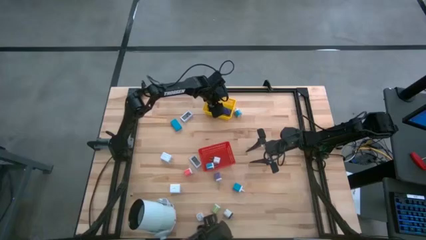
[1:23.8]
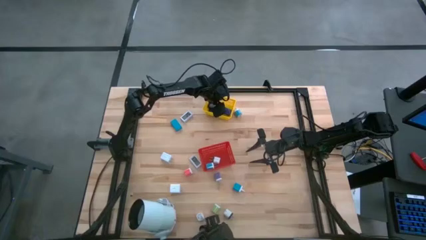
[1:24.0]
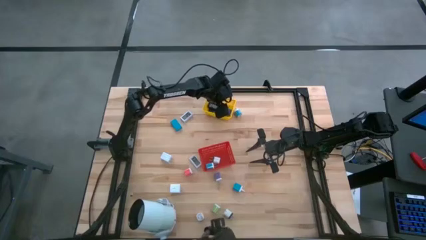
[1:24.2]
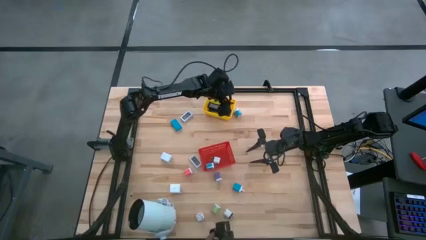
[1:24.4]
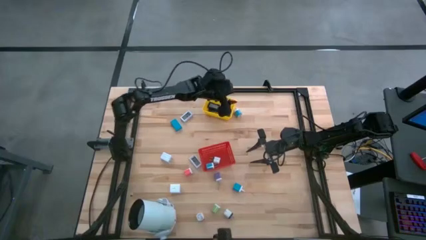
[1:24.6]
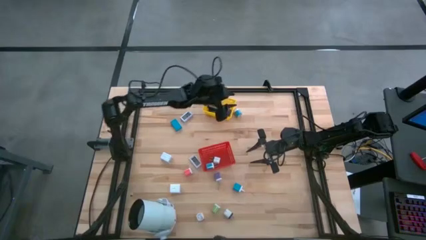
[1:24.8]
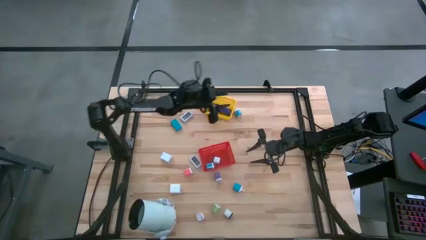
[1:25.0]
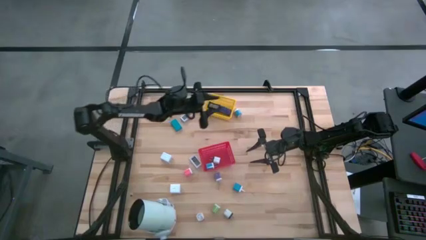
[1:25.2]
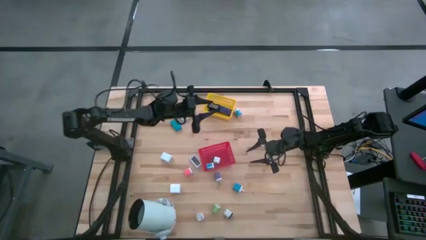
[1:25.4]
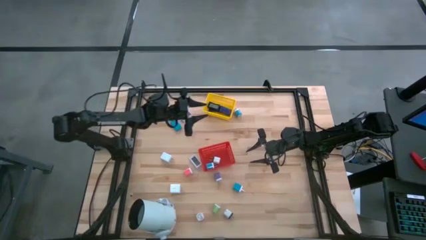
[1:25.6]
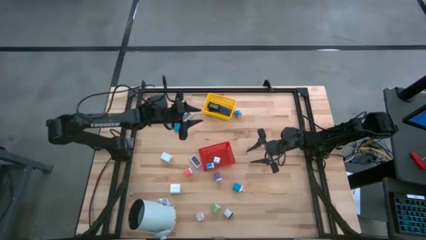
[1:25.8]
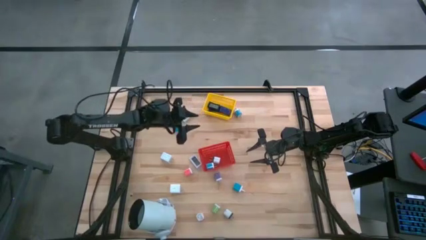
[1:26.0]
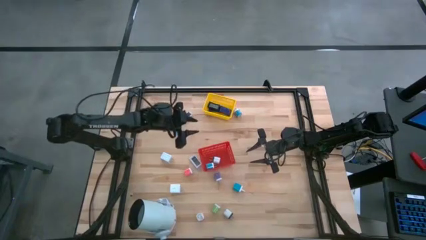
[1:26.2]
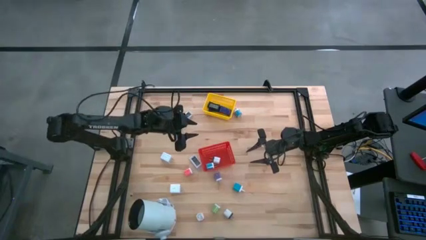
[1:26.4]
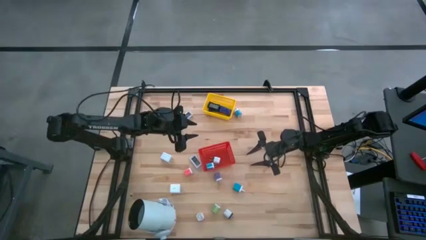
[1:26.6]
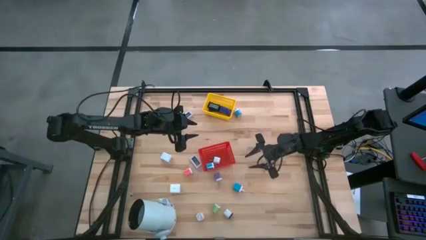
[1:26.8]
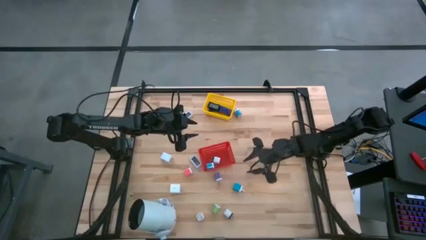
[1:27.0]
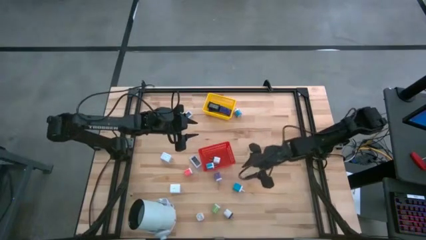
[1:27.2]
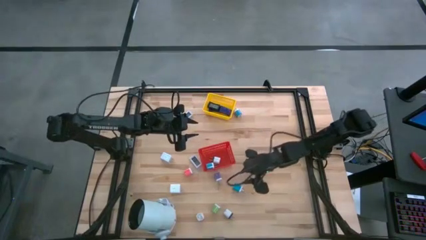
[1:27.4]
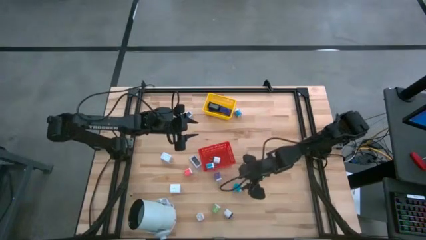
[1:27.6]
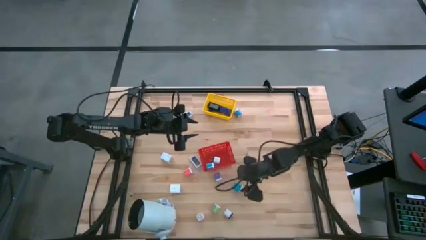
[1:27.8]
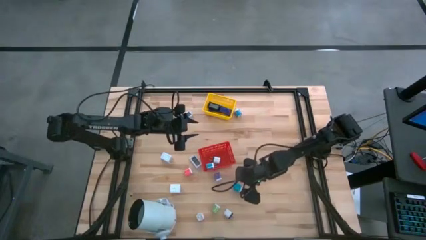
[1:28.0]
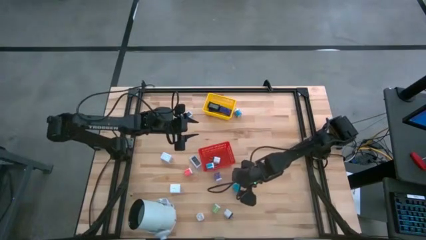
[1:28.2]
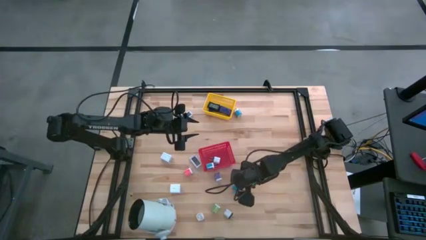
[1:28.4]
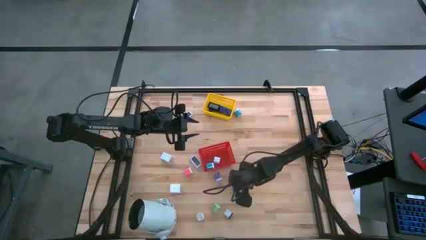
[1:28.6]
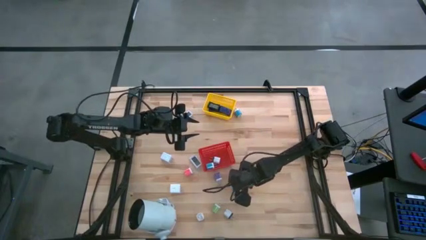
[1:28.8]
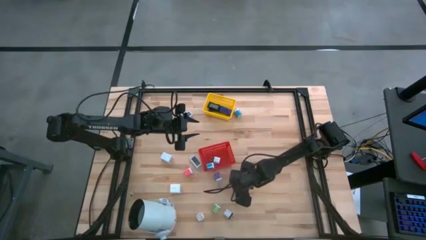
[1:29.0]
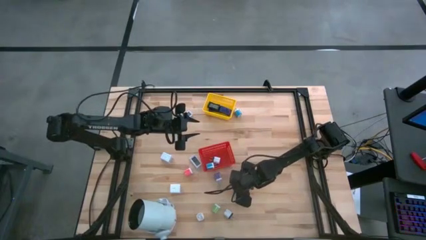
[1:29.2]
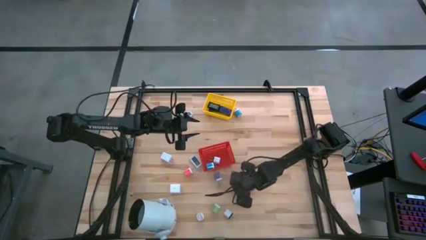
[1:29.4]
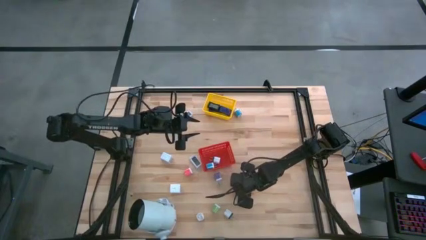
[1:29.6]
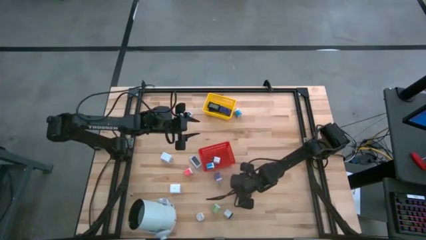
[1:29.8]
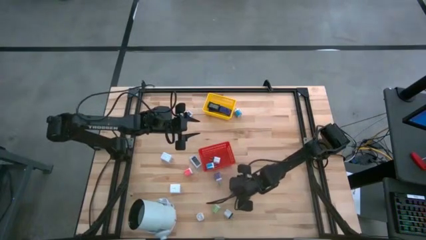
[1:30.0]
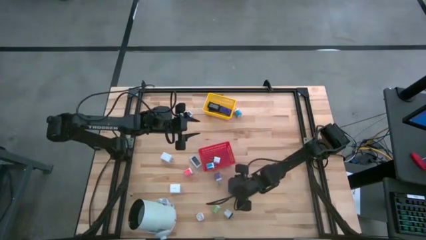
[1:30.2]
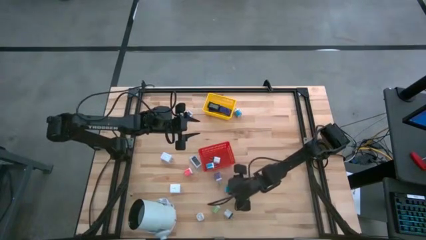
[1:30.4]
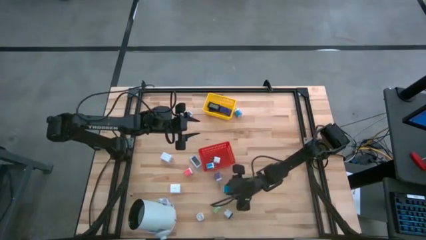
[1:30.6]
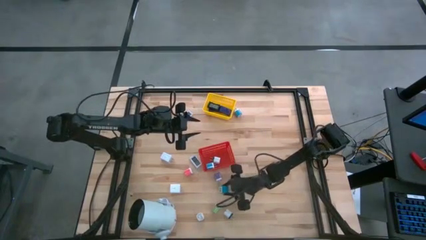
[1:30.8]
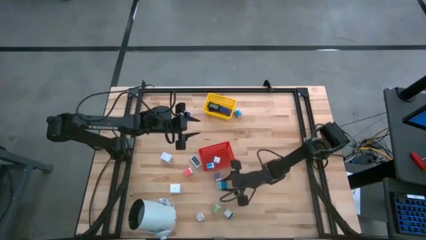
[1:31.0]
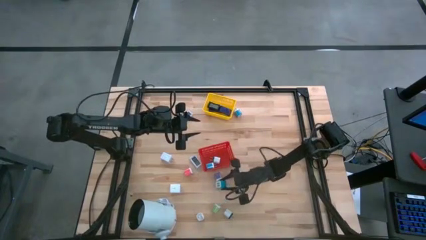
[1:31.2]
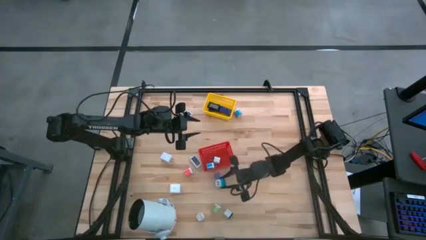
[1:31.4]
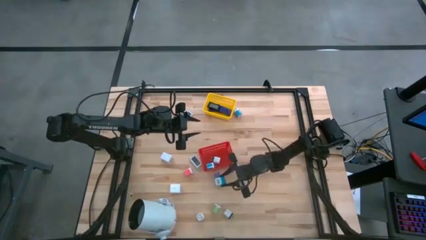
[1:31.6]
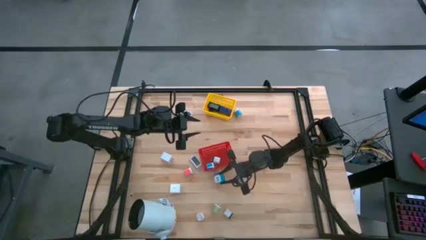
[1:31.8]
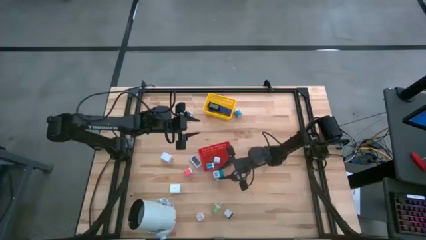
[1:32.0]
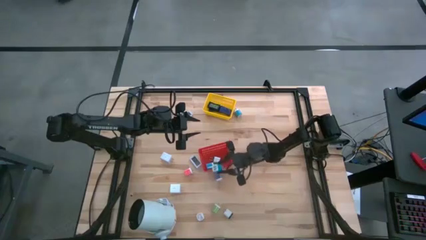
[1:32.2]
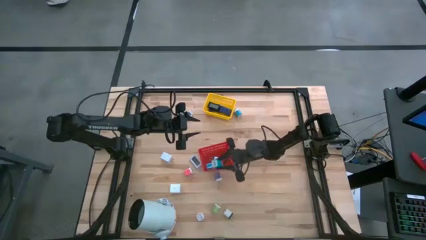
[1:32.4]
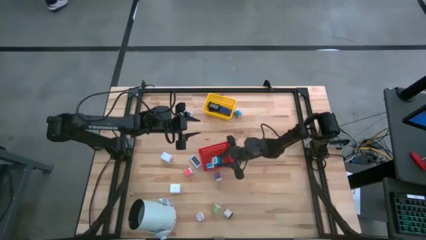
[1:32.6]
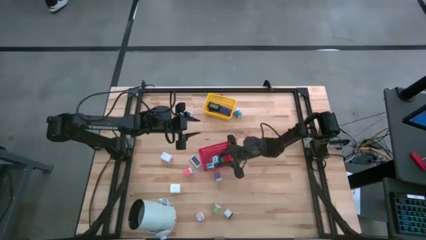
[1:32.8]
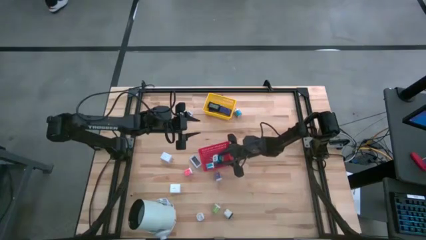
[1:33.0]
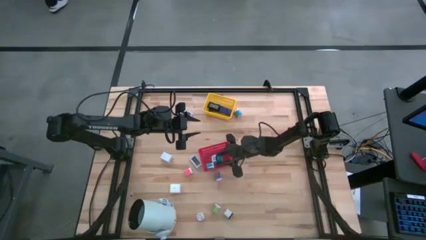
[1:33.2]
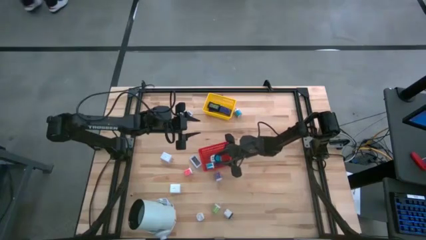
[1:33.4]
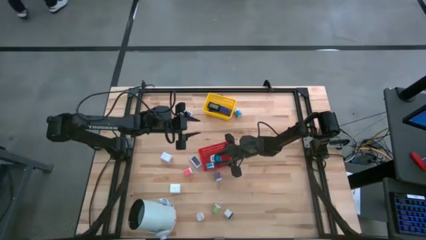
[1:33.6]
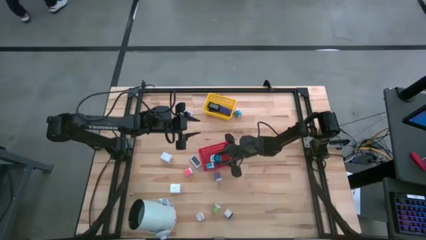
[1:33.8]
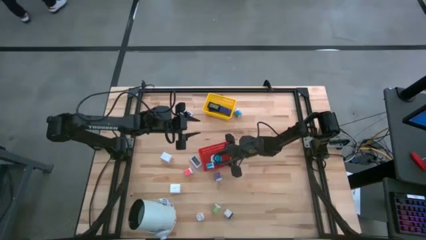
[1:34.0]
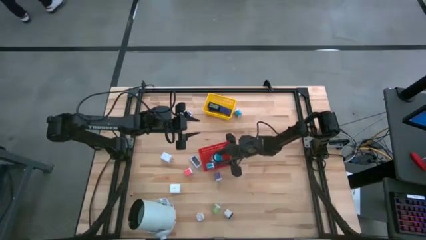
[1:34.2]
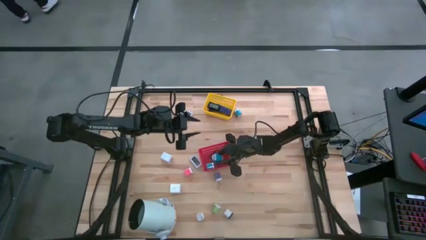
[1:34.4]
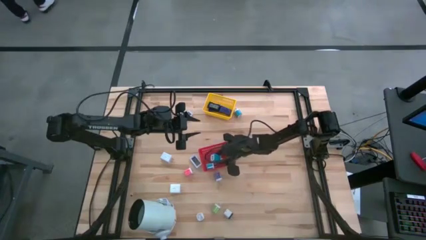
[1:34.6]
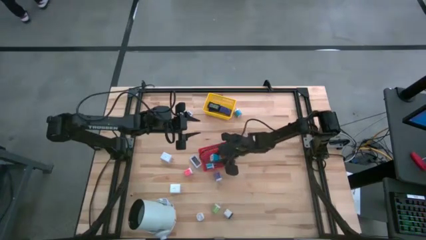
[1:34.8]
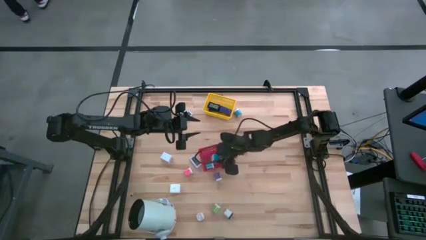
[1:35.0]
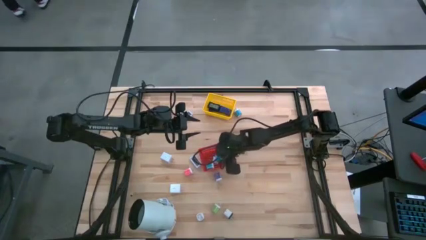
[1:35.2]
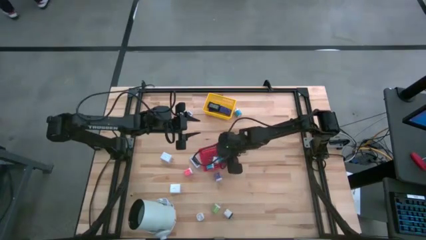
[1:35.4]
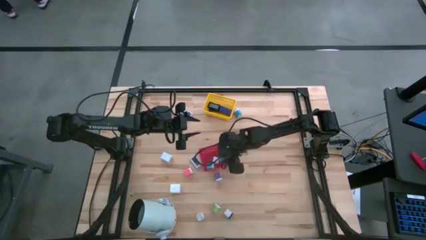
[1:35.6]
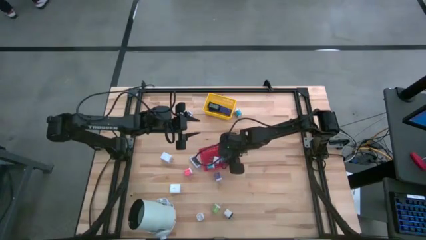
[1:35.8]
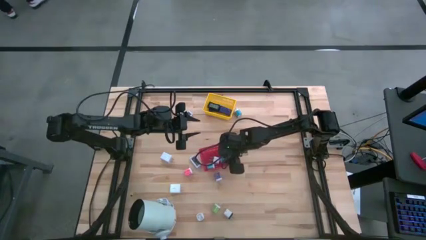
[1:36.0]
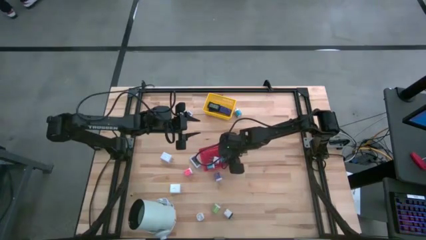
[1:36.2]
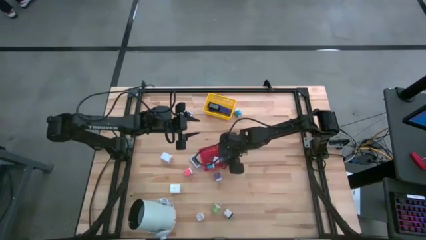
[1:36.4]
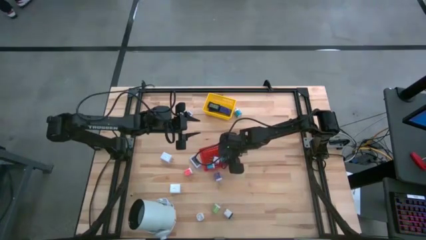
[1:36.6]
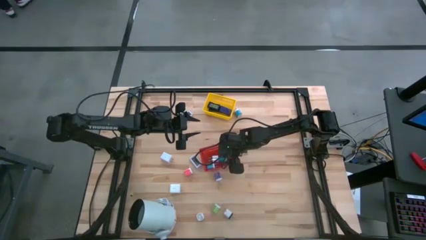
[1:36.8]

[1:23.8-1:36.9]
Task: Pick & Place Office items
Put the bottom blue and white charger adapter into the red bin

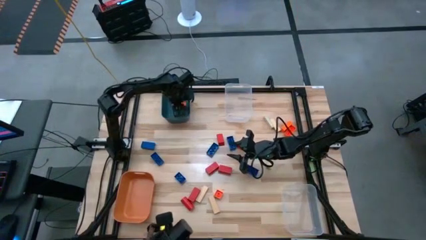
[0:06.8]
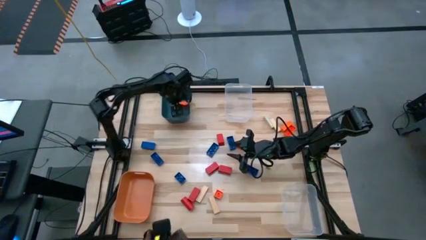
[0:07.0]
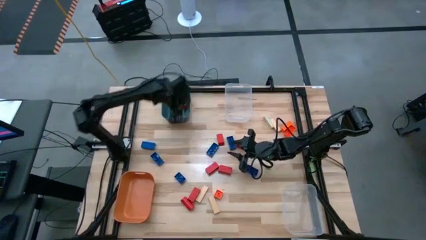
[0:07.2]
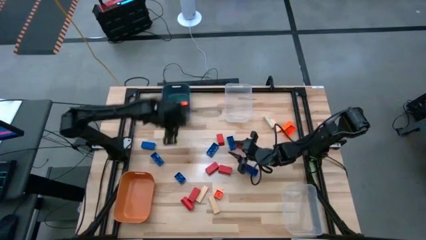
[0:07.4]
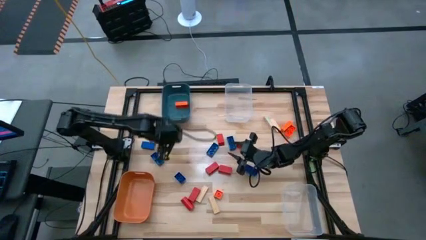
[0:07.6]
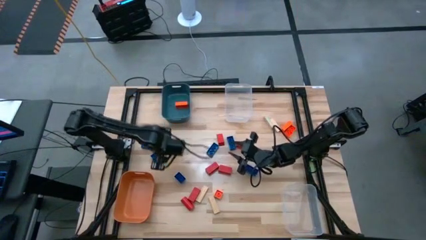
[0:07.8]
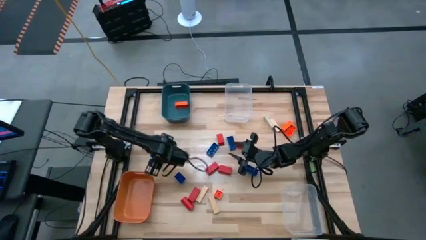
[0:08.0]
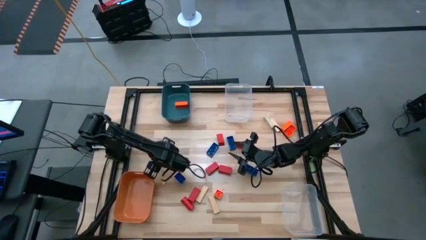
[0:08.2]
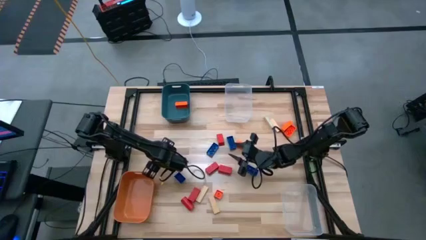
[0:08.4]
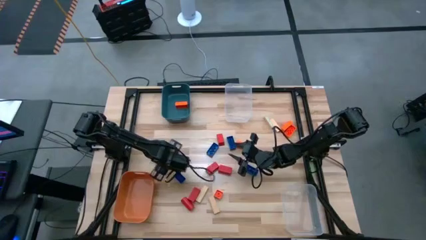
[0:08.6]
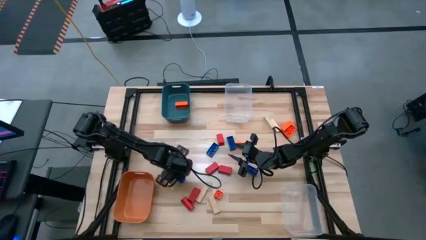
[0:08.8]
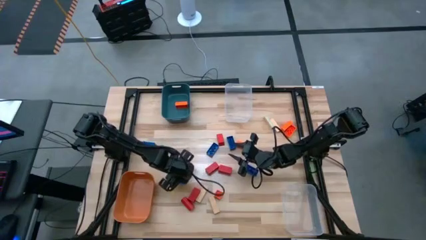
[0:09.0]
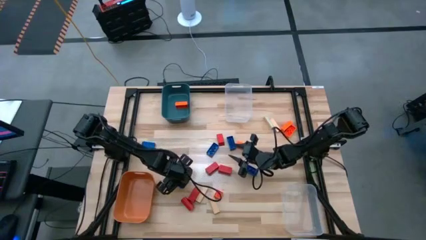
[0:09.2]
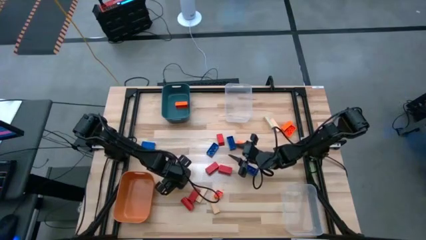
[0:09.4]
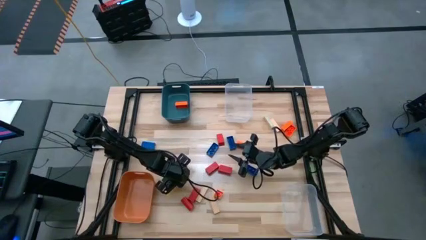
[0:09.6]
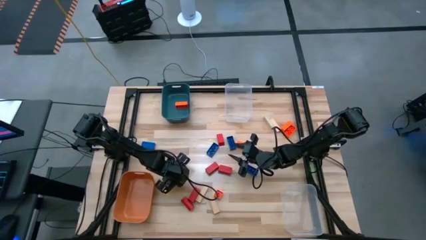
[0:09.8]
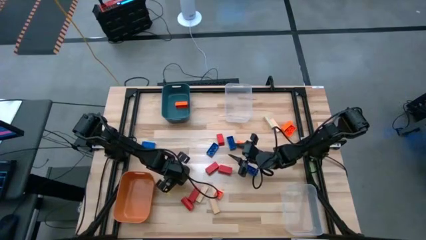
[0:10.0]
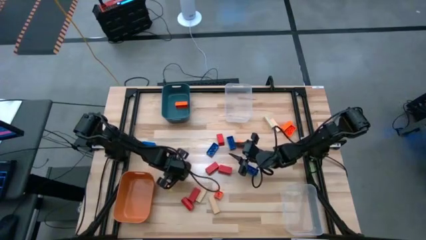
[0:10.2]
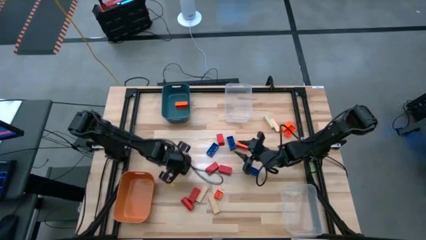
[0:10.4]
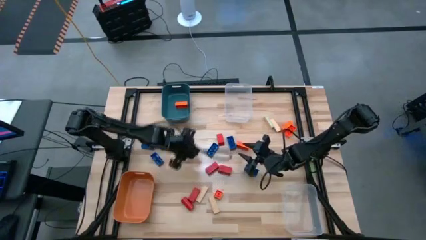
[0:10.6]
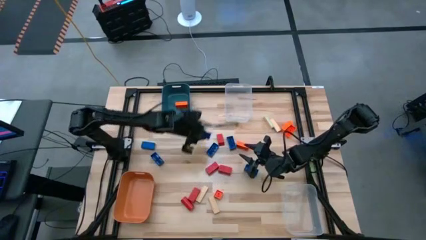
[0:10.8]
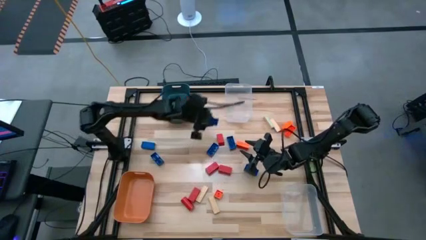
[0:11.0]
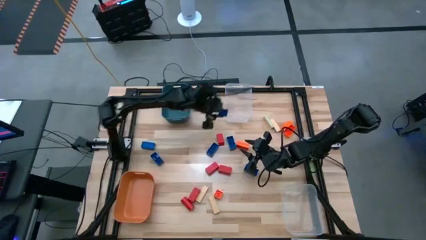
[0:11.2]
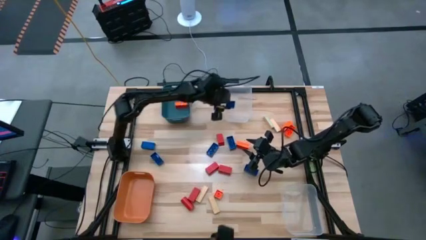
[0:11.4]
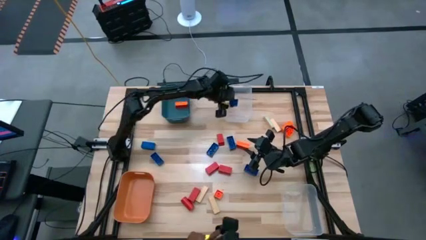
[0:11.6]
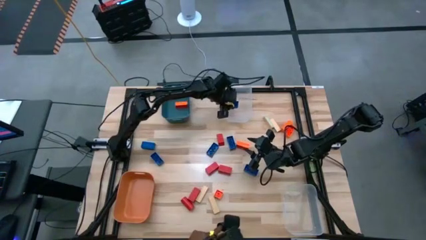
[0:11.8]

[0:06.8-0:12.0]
Task: Sort blocks
Put the blue game piece into the top transparent bin
